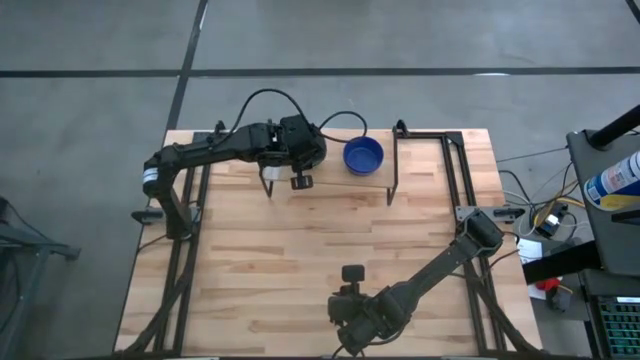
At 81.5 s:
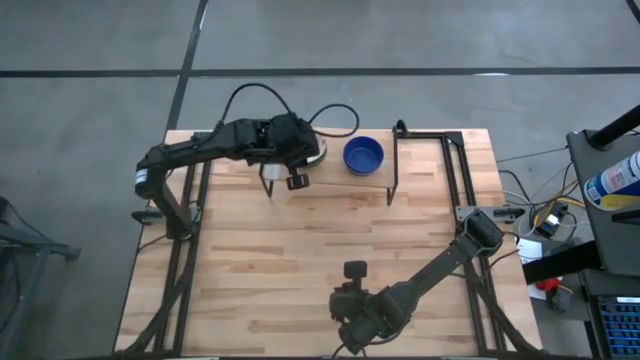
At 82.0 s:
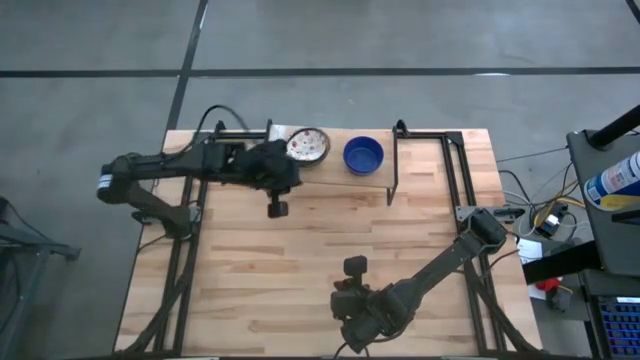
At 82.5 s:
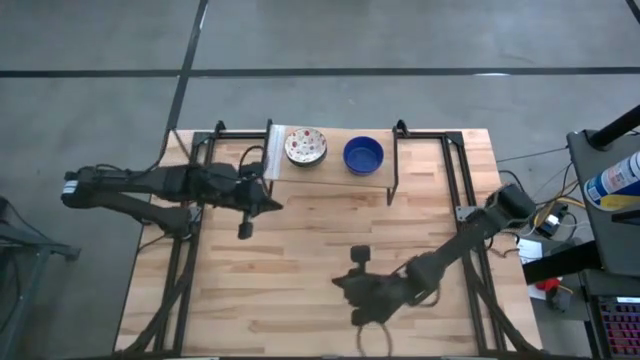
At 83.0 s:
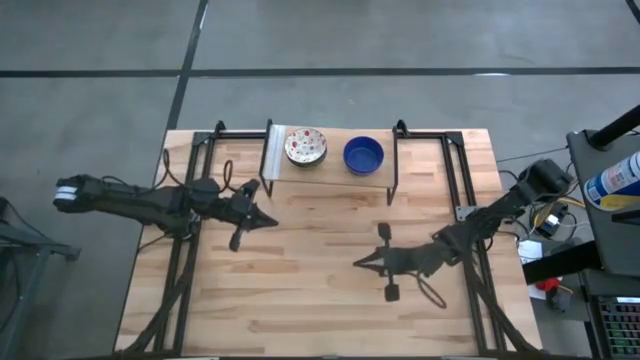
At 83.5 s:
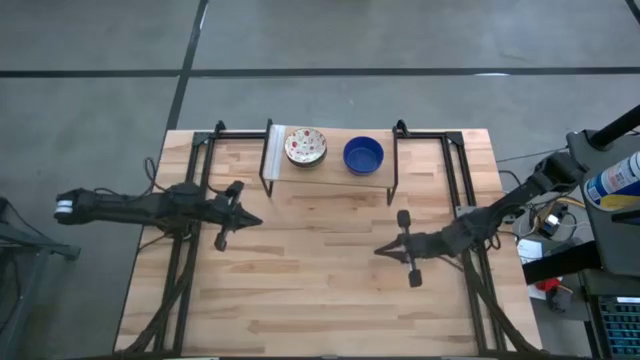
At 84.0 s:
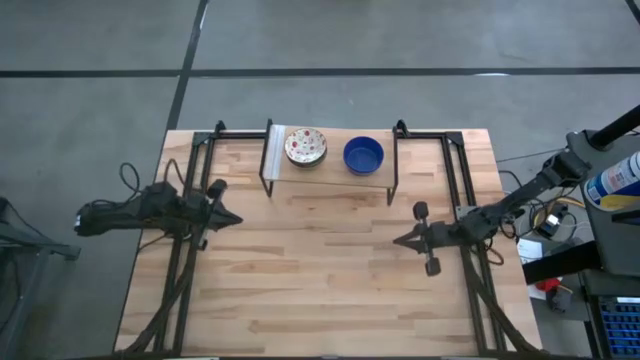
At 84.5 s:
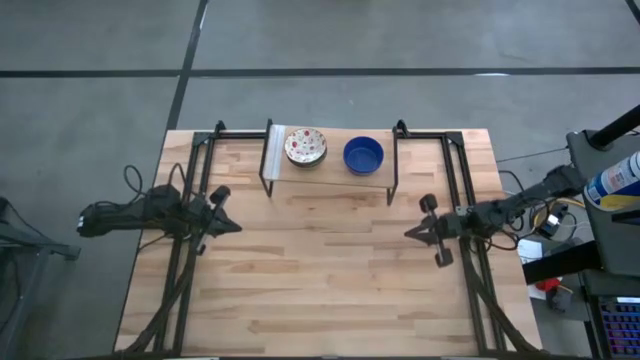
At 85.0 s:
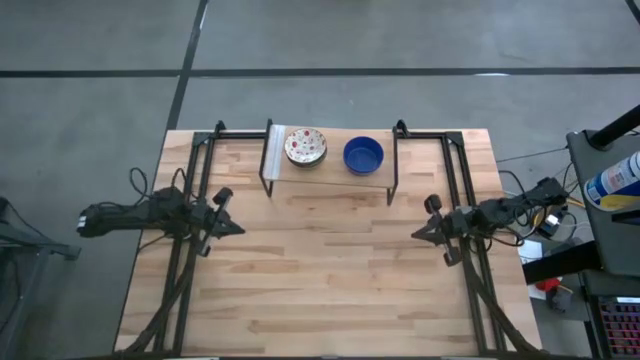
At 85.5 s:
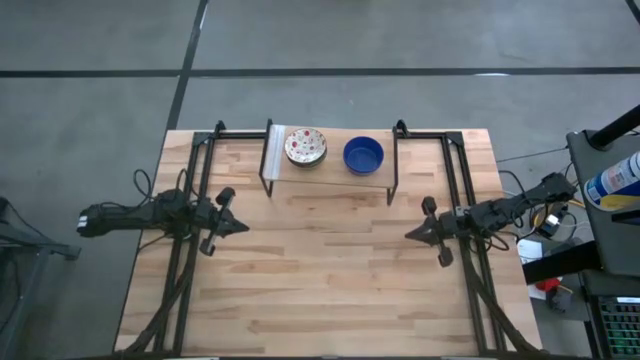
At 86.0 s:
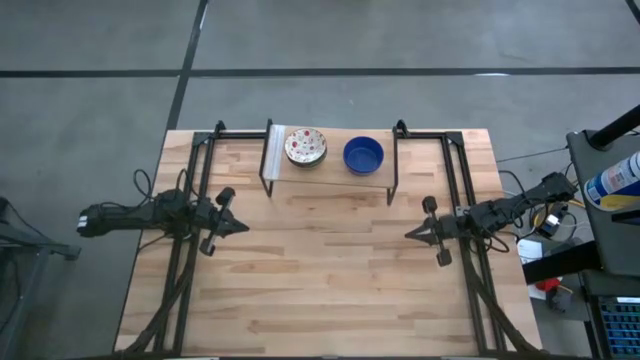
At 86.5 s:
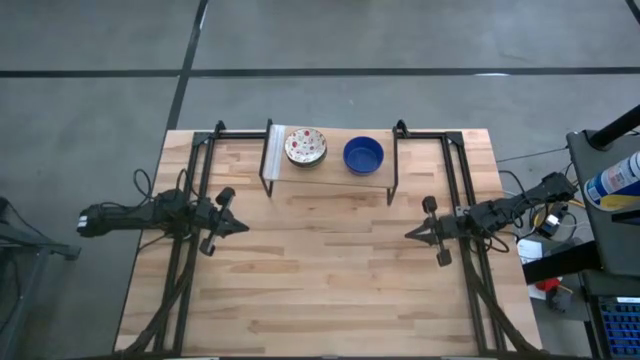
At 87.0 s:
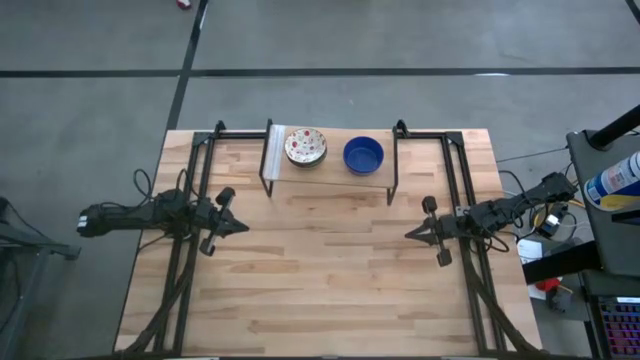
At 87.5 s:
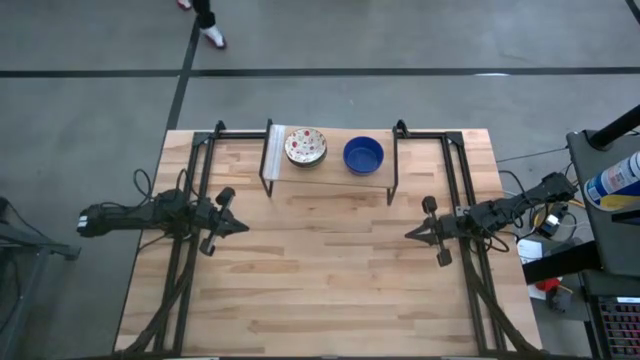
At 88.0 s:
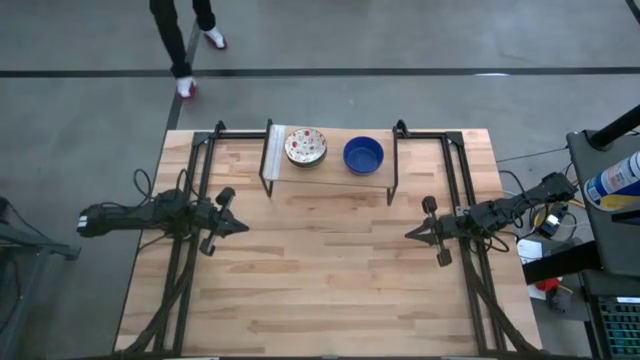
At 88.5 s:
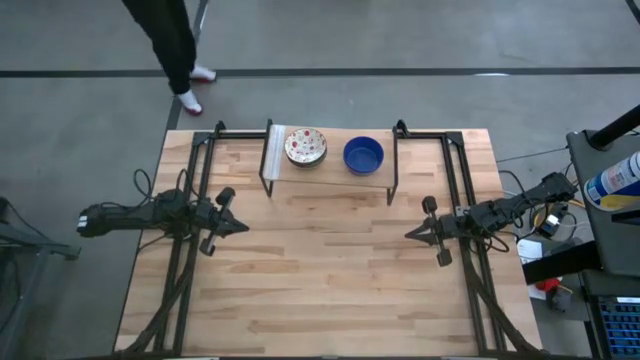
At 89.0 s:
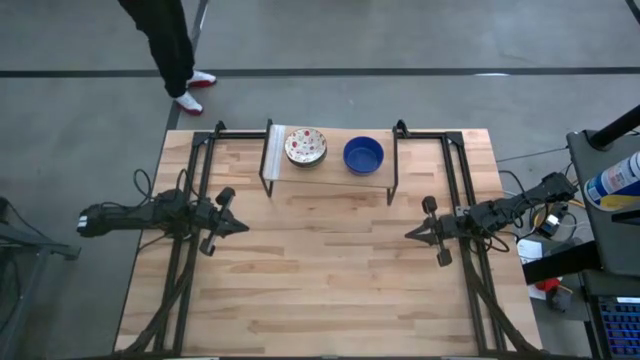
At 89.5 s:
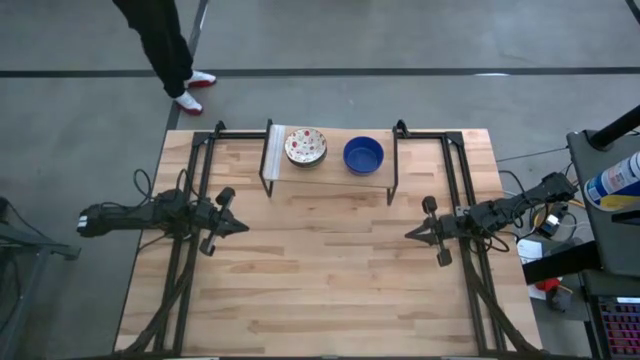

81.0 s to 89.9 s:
Task: Pick & Place Mini bowls
Return to home position

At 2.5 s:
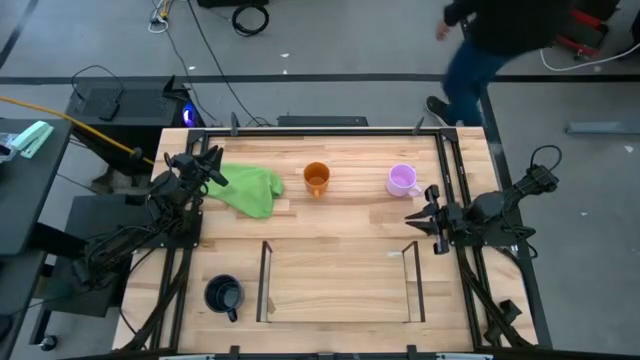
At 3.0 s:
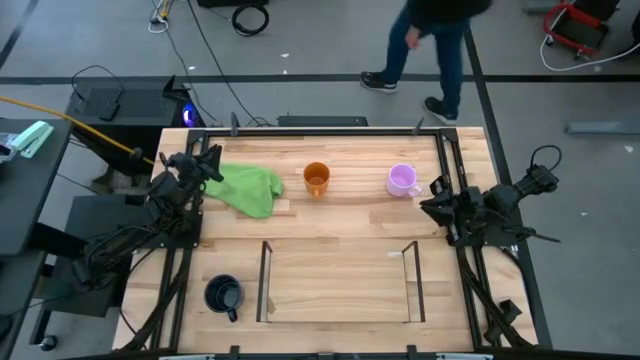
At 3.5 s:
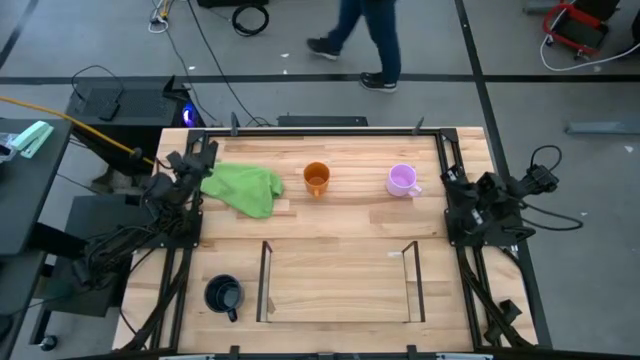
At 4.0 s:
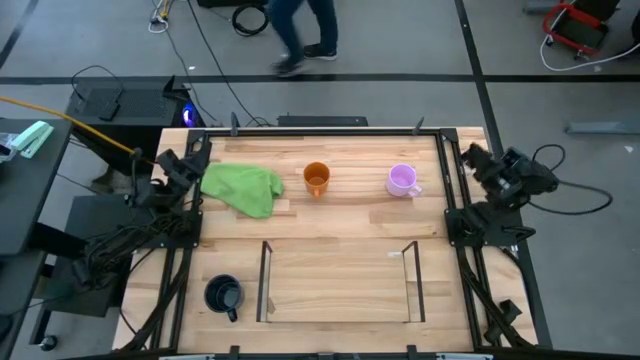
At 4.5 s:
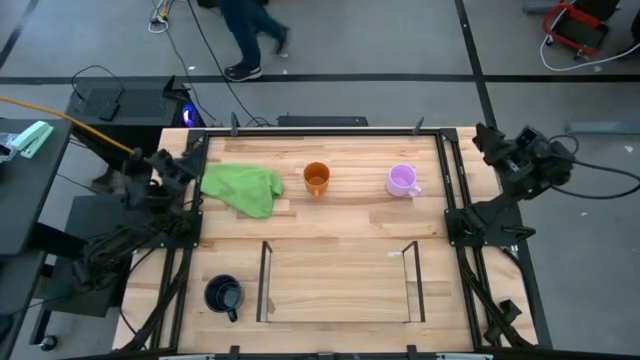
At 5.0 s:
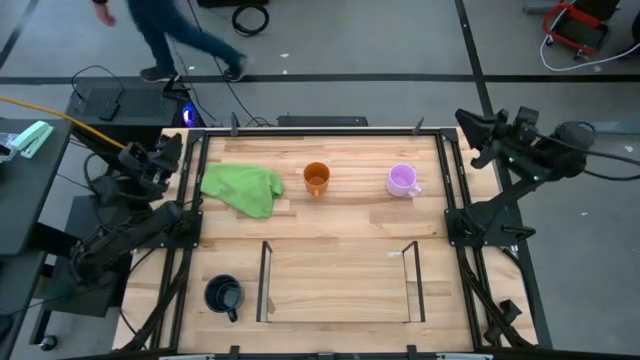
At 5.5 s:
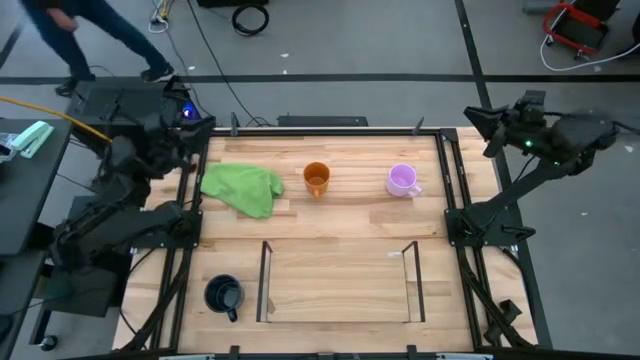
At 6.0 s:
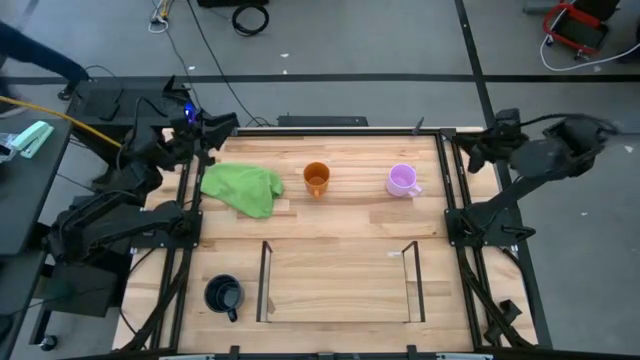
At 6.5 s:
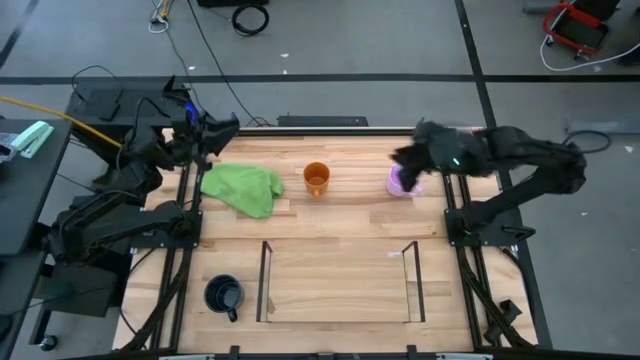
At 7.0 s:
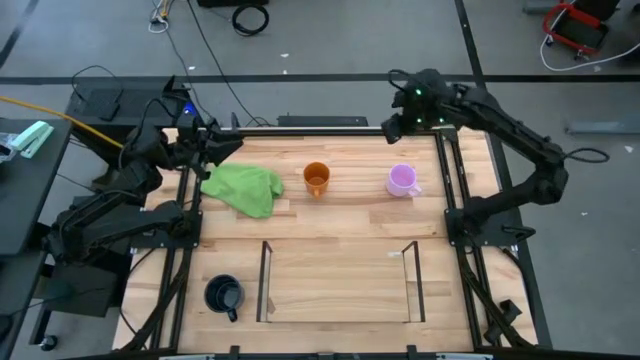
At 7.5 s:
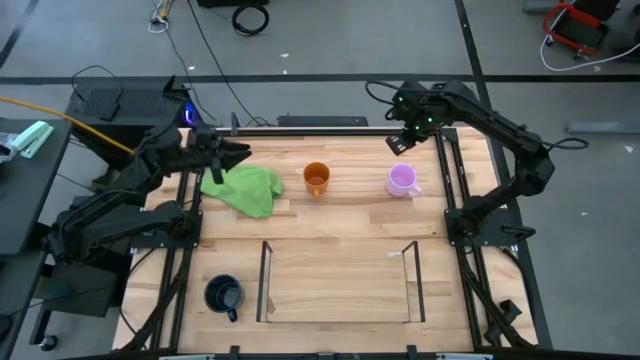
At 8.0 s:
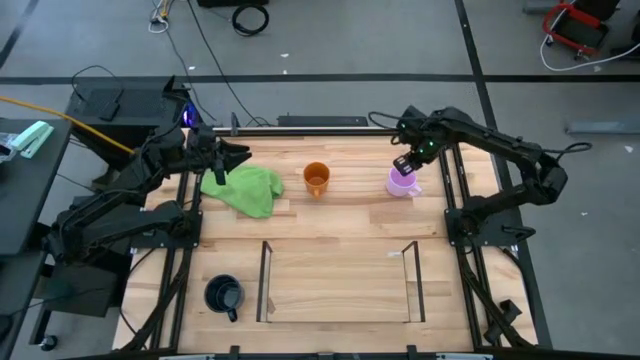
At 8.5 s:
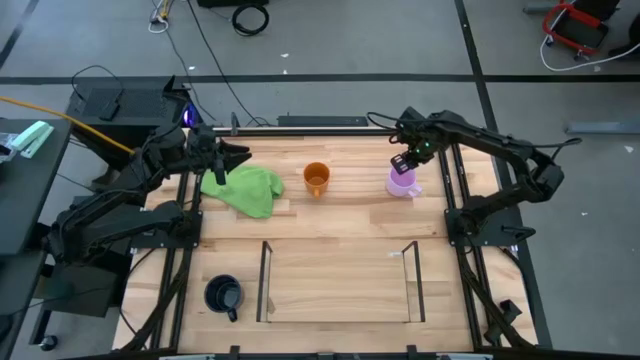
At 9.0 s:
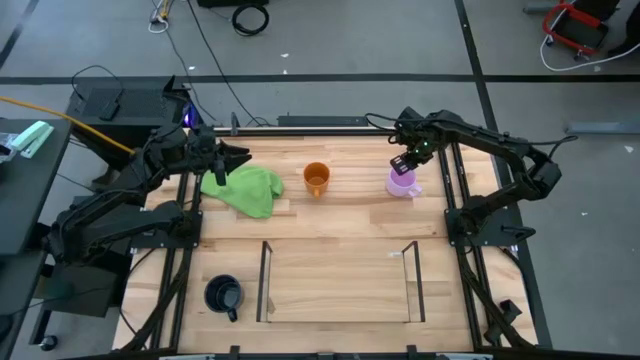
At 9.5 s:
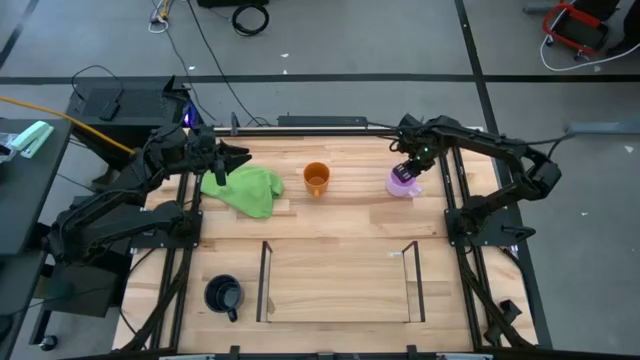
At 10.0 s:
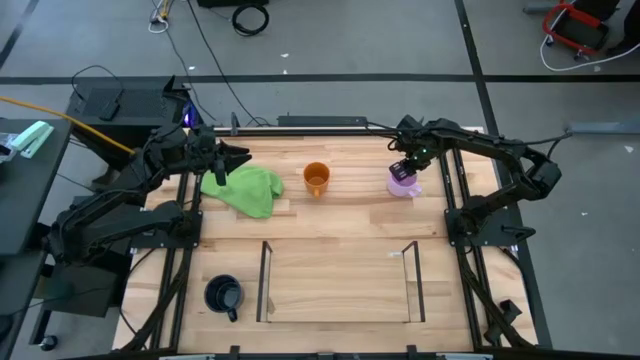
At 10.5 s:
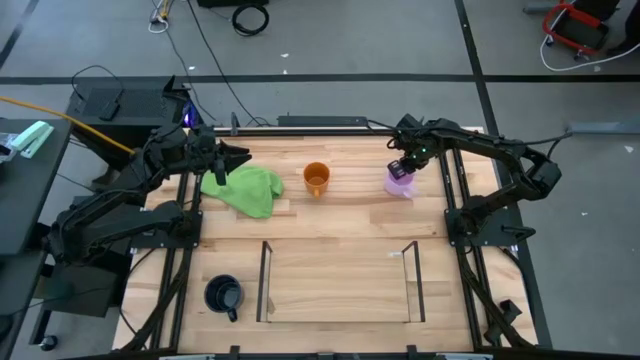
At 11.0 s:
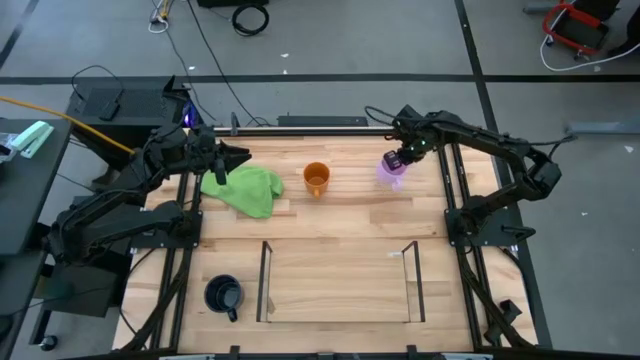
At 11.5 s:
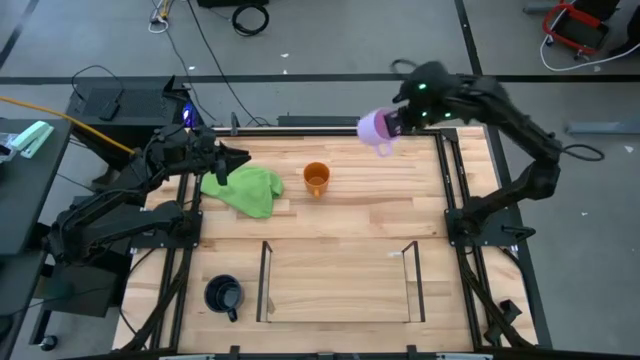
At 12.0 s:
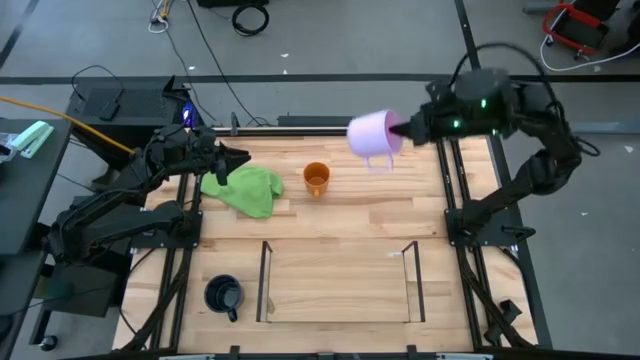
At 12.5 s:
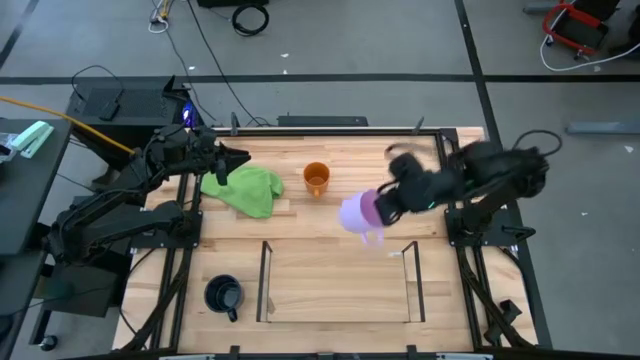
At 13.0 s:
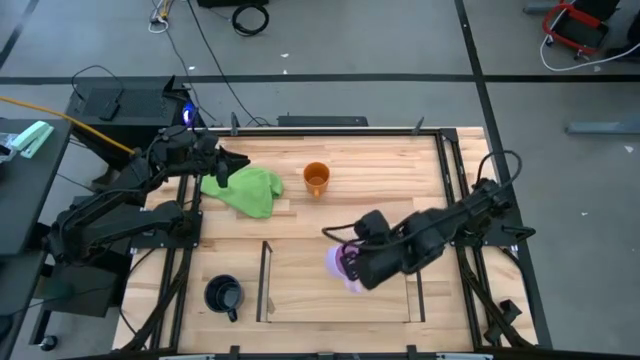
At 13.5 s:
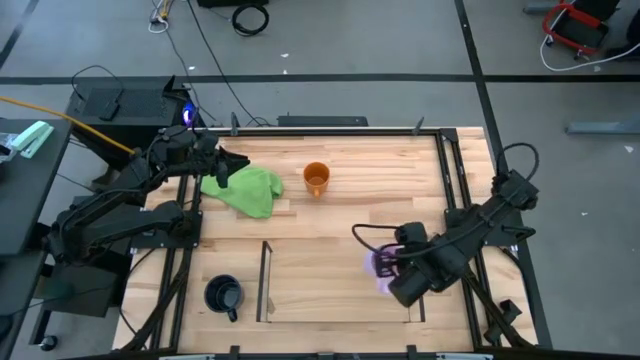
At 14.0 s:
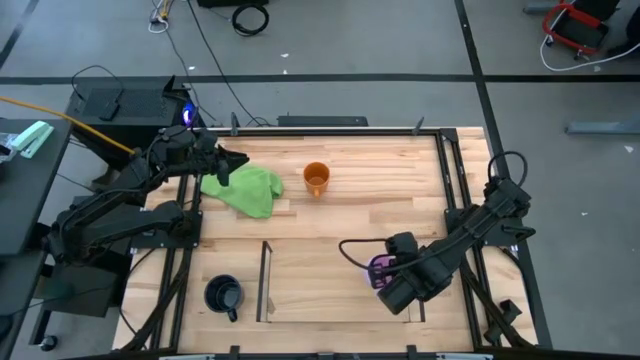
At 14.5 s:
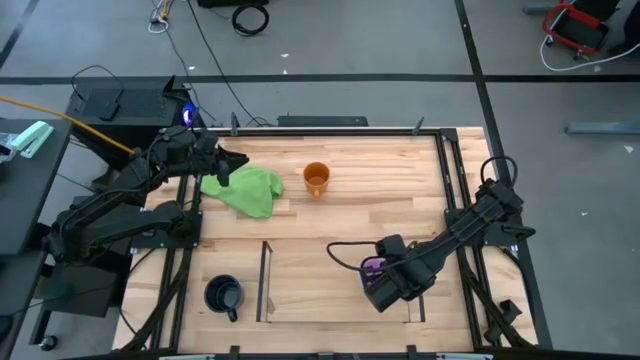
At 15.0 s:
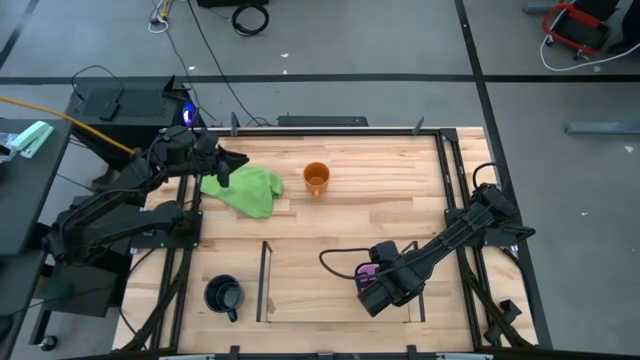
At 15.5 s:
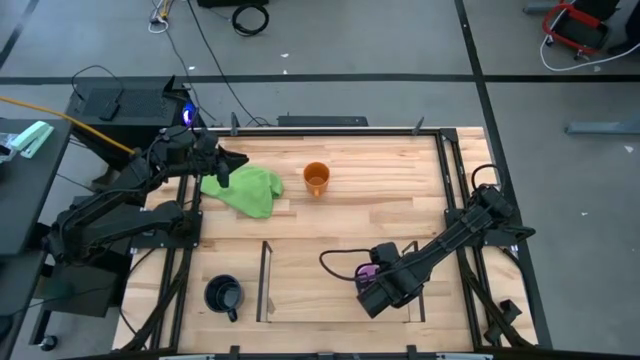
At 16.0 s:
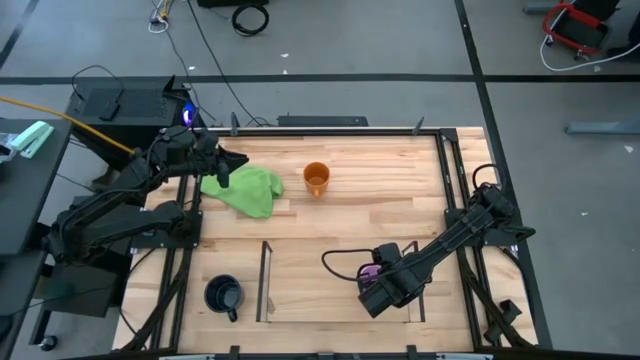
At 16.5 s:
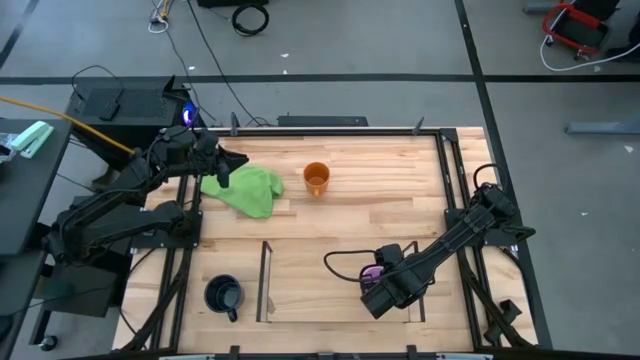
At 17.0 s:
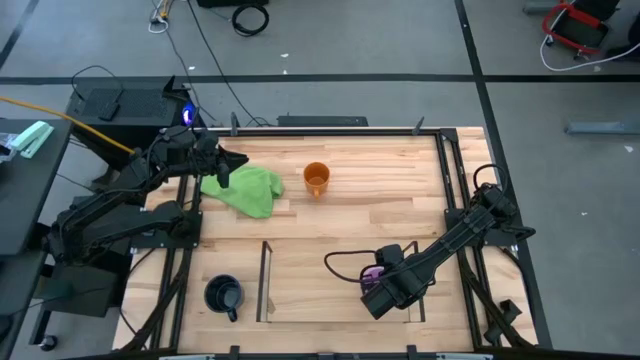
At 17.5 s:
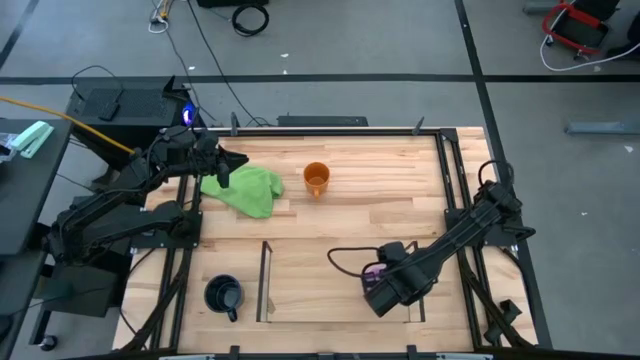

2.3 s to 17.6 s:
Task: Stack small to large cups/mugs on shelf
Put the pink cup on the shelf
